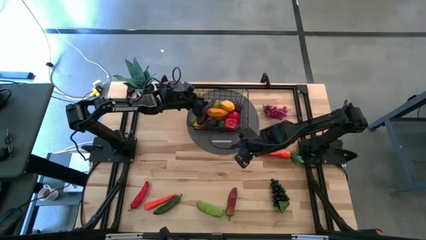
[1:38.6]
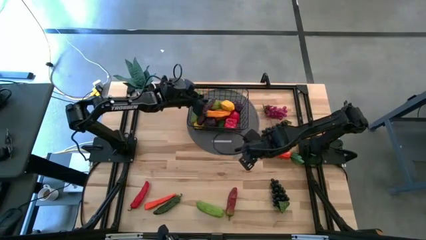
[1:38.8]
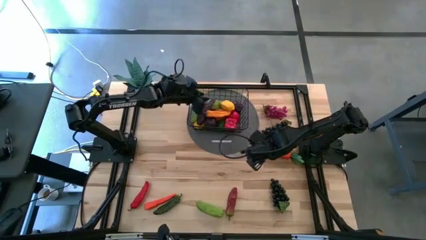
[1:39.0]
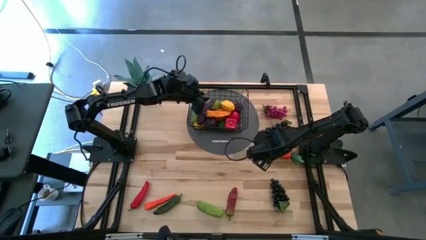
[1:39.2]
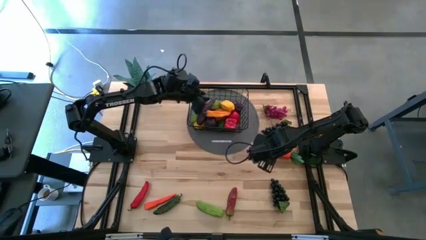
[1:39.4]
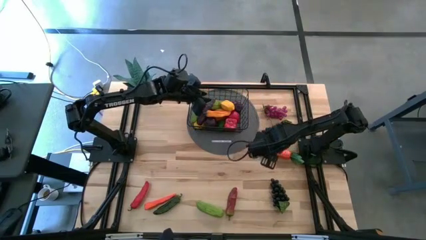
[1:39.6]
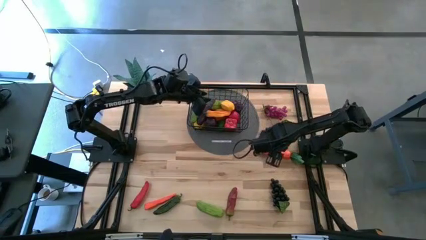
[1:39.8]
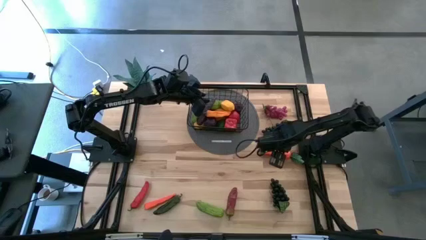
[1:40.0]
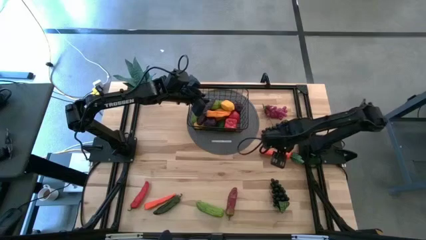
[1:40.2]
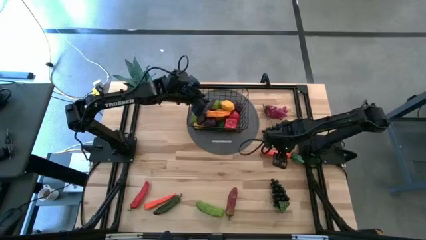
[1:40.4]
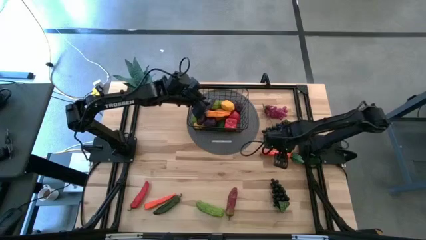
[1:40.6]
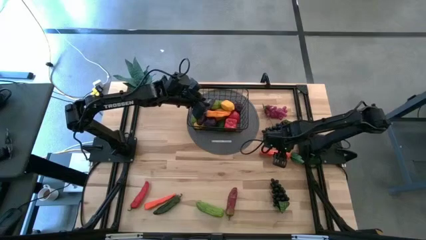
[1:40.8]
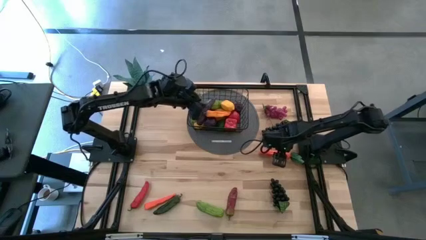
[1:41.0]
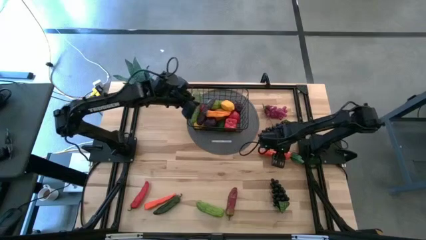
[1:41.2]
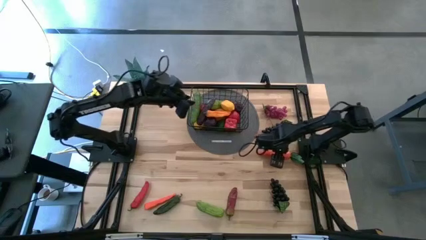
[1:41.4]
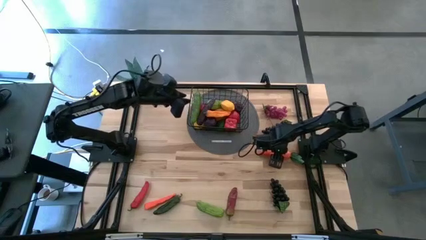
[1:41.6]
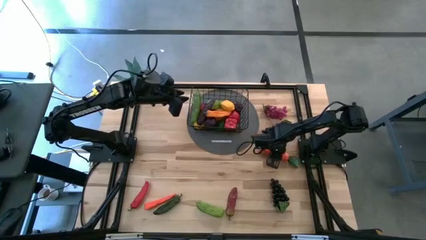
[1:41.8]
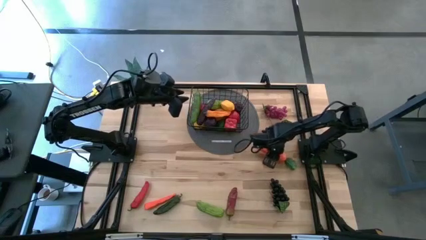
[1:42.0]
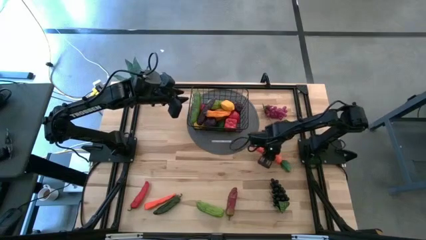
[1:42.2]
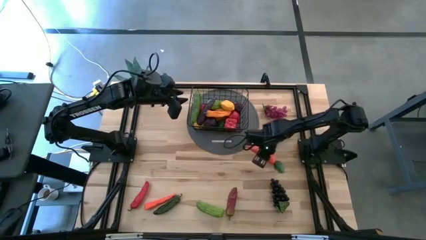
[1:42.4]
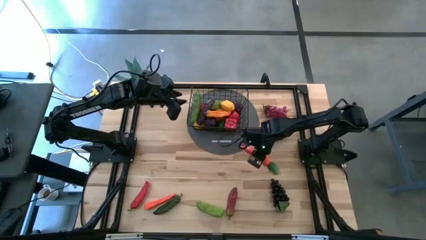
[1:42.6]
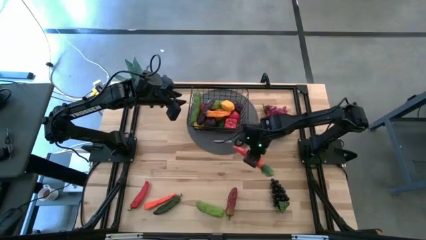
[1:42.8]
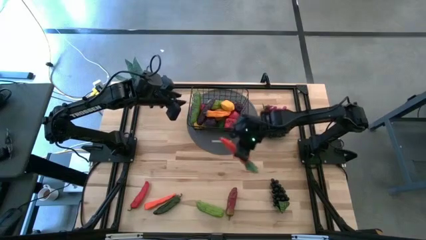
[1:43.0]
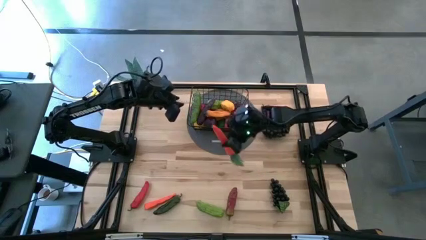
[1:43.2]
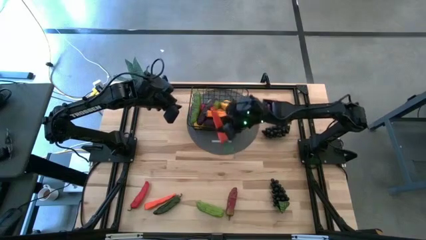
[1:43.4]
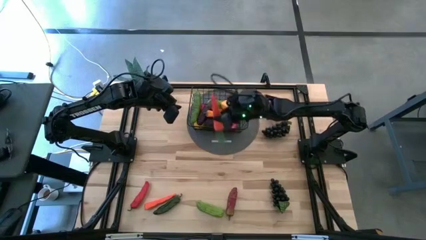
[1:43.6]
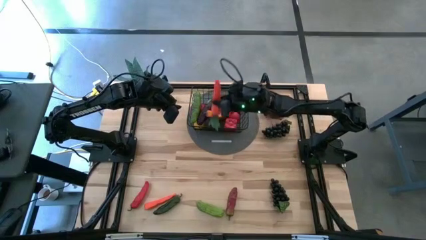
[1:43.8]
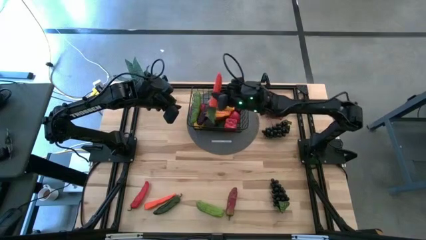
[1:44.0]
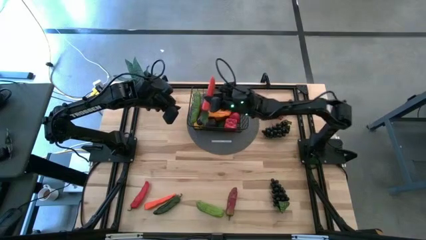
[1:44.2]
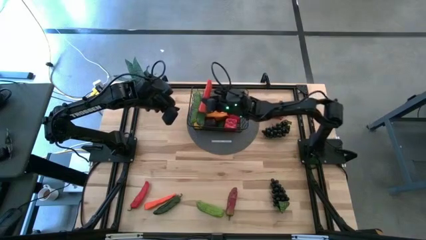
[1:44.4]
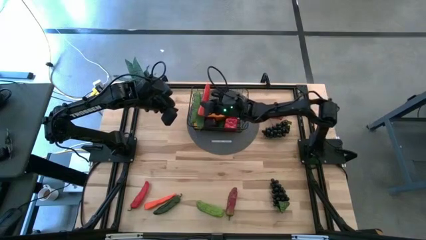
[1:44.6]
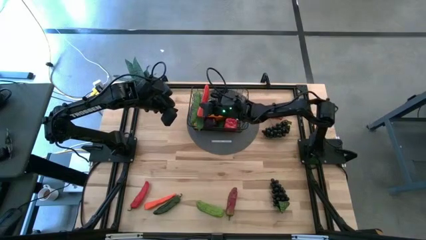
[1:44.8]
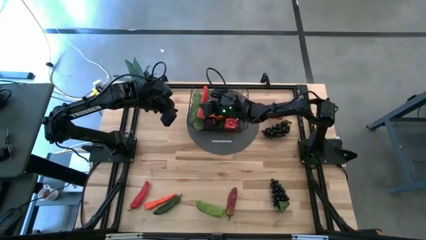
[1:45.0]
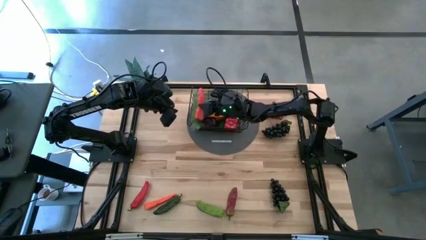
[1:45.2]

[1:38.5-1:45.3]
Task: Build produce basket
Put the top carrot into the wire basket

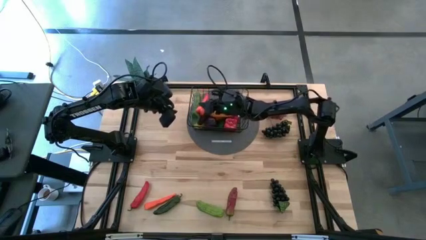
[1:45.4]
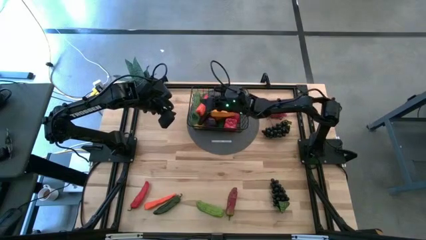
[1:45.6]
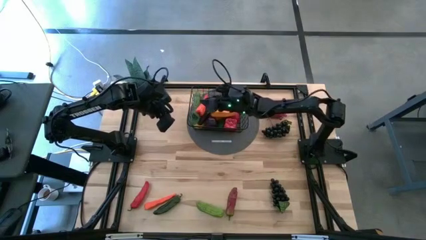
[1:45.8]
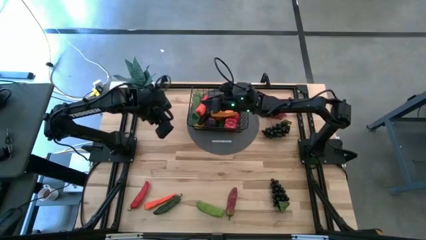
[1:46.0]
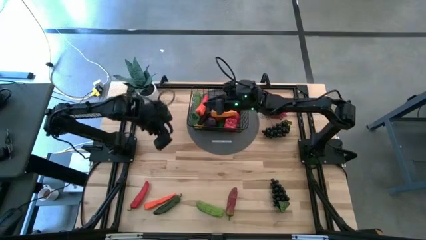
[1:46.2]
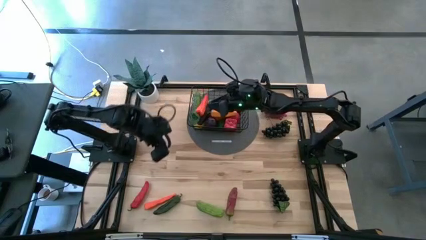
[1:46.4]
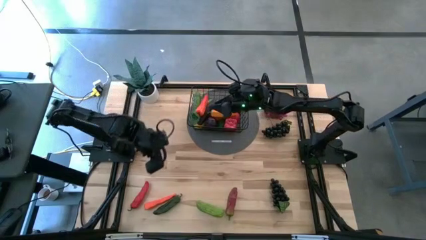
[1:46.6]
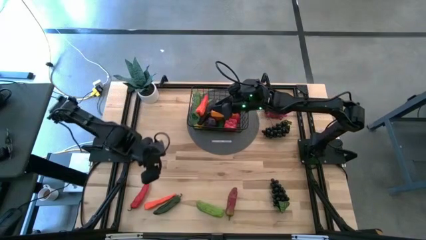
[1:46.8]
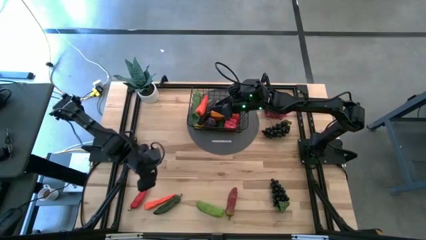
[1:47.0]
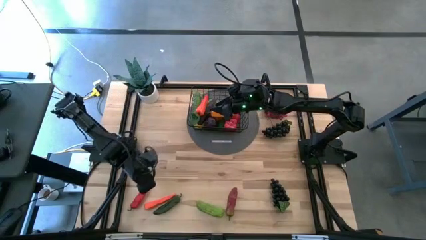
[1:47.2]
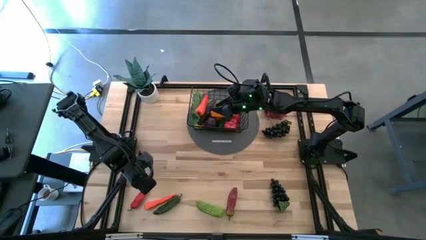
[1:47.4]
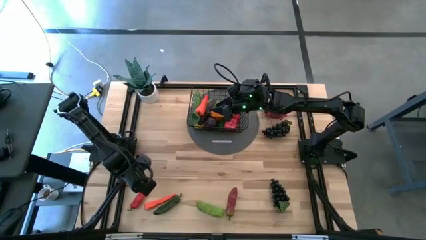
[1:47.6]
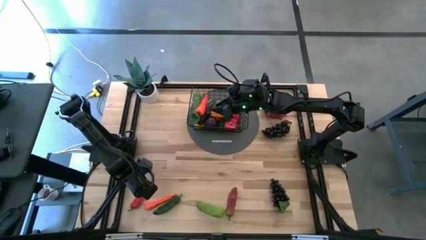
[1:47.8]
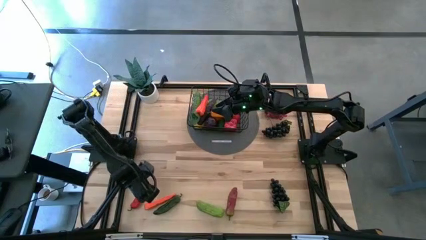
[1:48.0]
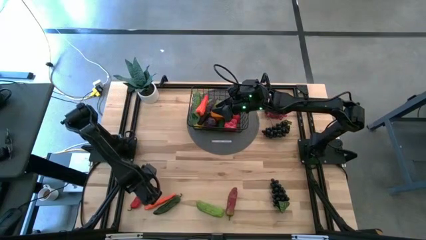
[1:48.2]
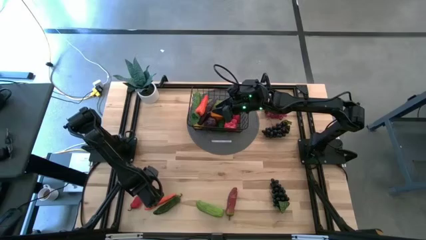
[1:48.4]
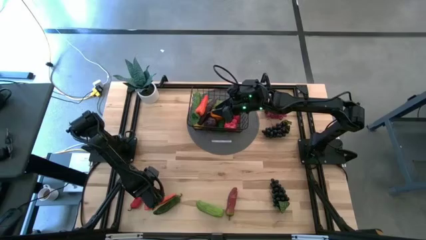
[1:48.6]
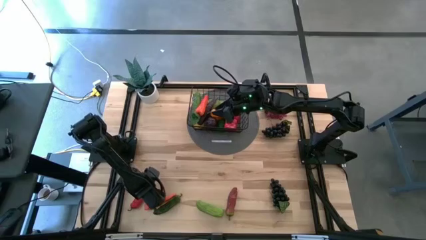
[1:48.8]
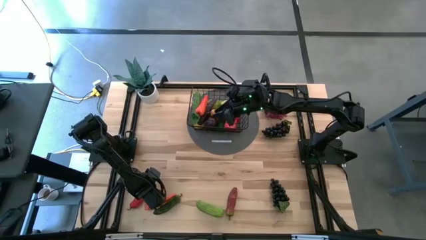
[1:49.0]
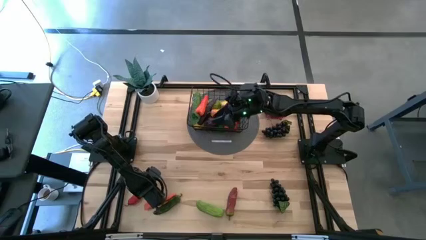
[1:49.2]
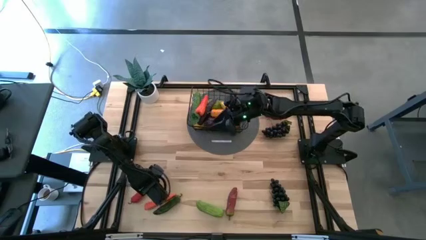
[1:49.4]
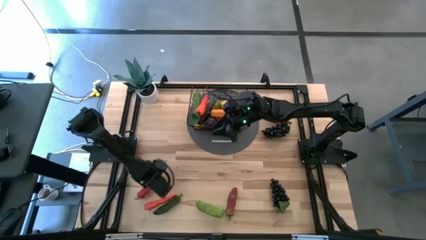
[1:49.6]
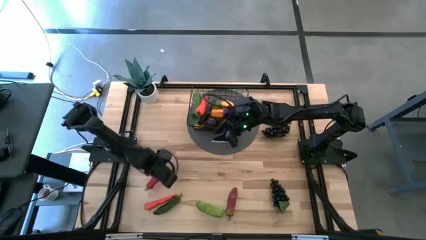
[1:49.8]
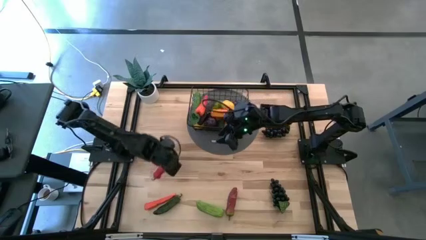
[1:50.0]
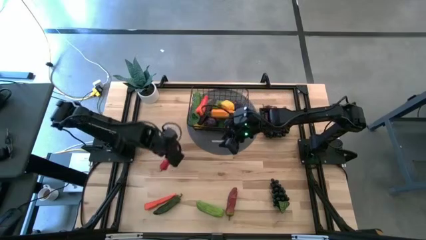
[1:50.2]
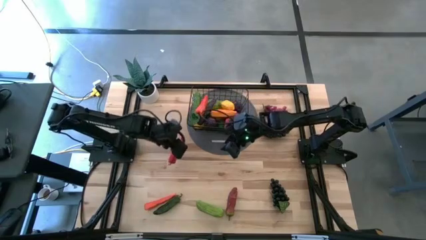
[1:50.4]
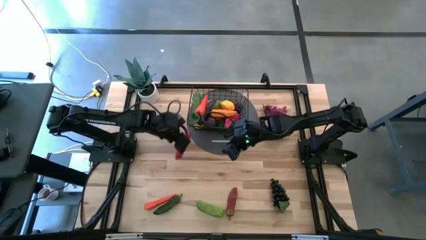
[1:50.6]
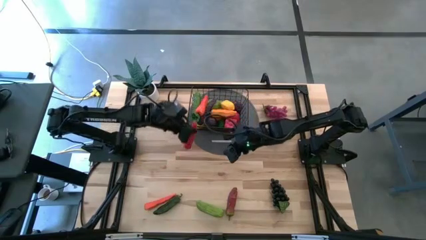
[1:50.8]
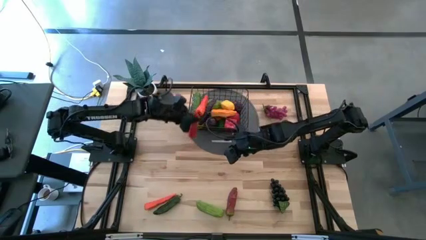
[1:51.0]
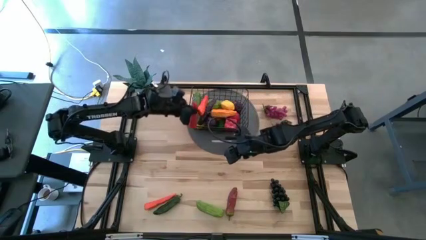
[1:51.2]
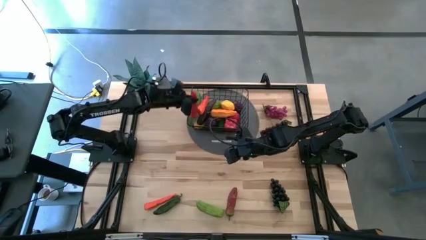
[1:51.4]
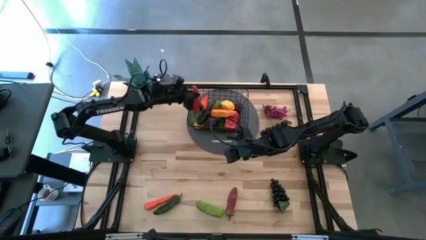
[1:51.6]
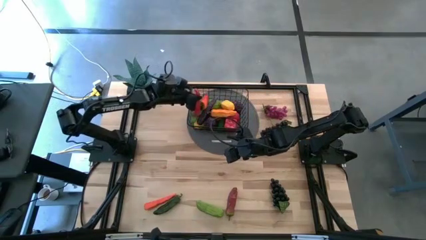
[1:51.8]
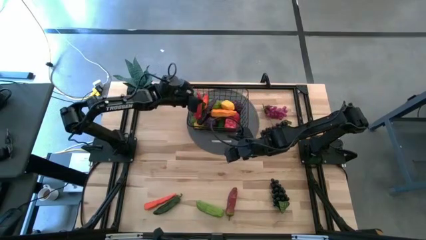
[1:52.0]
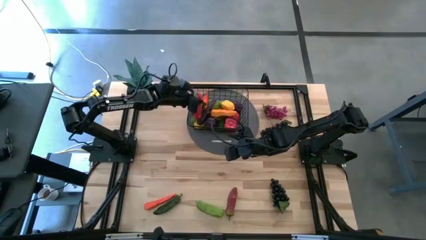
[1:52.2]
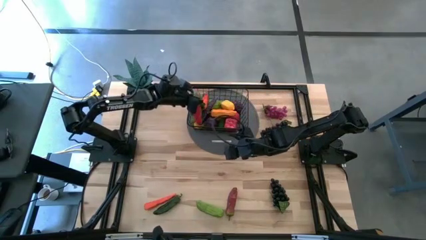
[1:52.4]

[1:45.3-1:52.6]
Put the red chili pepper into the wire basket

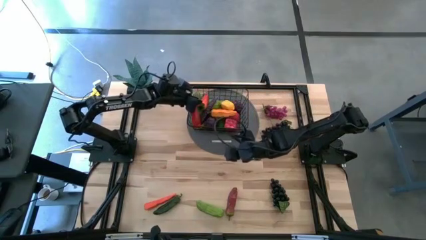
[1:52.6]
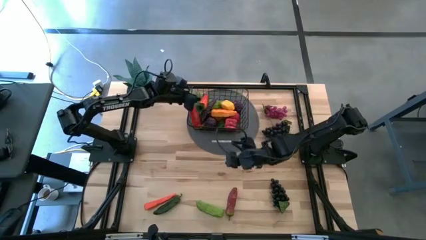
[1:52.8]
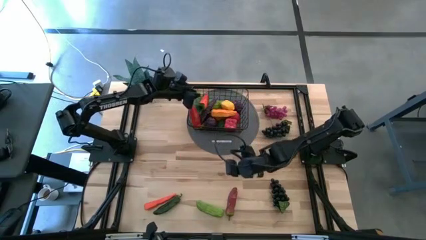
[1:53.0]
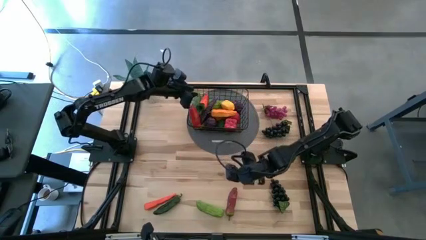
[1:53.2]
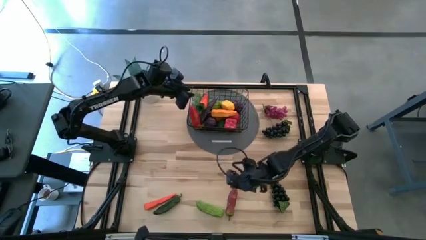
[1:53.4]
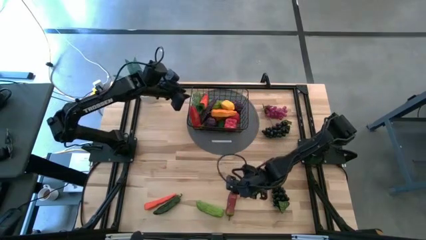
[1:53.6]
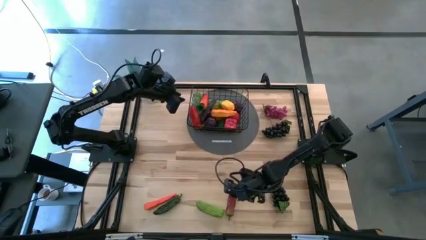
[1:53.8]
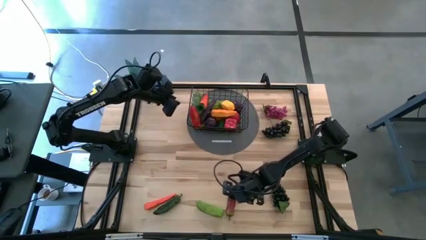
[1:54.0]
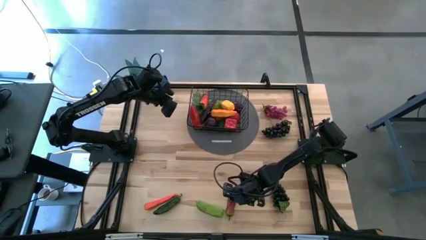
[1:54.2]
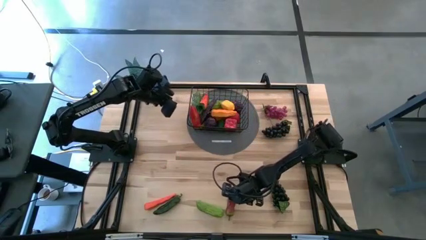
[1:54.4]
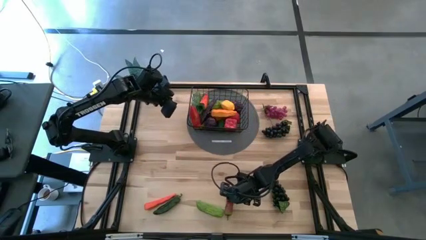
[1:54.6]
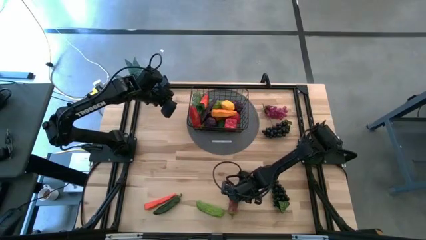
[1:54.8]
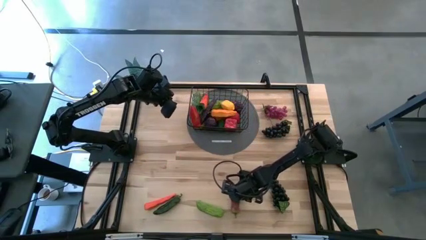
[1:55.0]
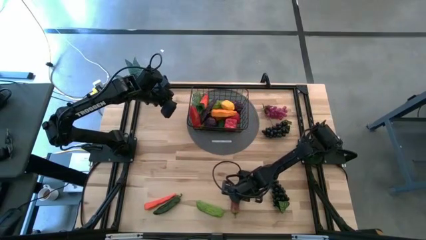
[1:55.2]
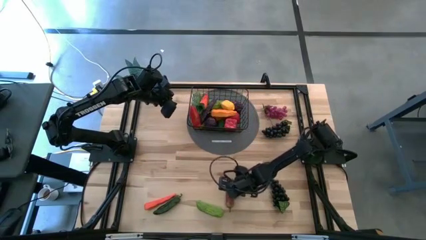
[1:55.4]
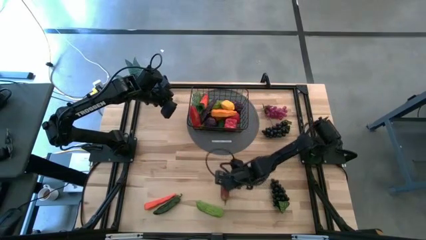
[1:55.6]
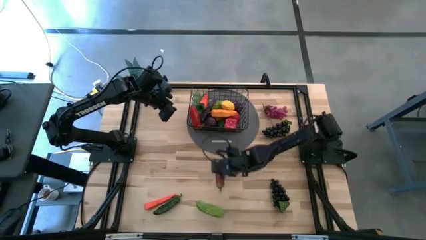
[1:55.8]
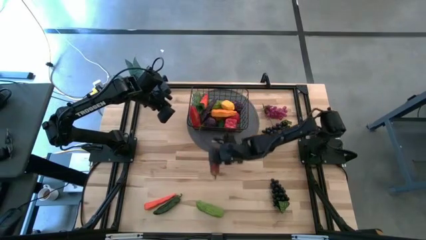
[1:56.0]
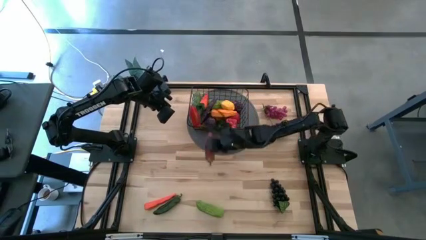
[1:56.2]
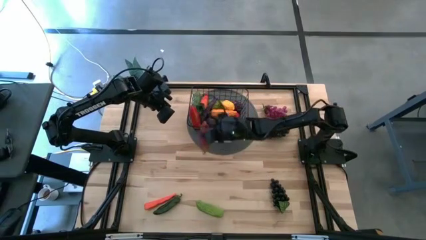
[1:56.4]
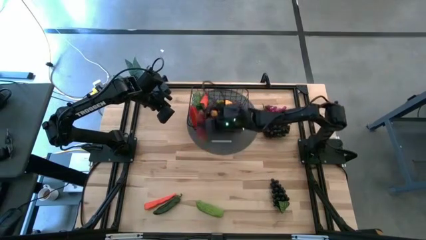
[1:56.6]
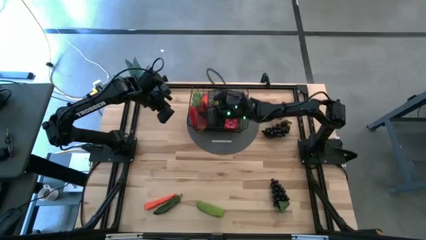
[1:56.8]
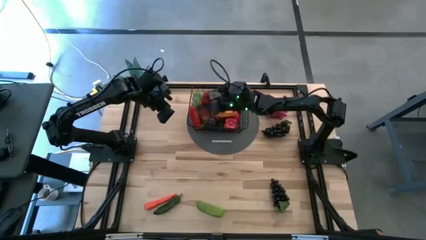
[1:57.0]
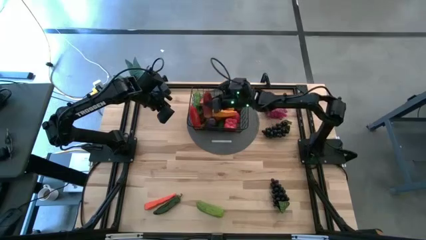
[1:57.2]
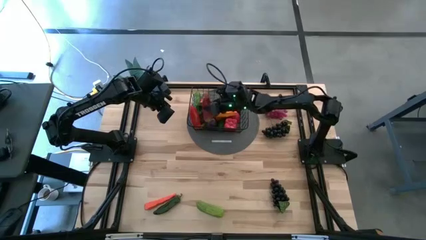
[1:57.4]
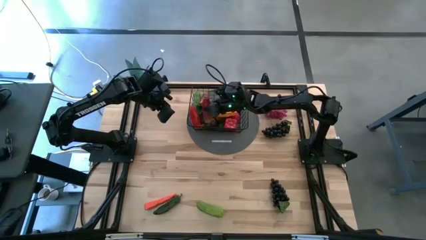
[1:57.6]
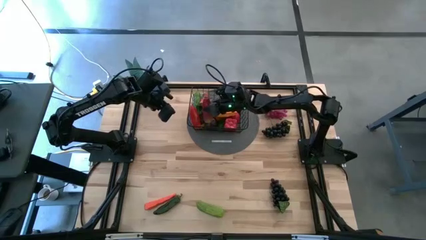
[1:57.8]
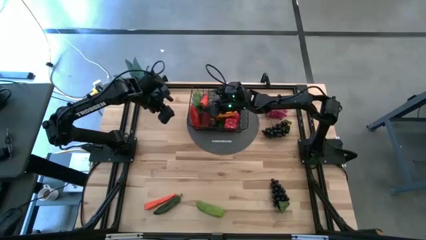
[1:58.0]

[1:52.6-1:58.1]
Put the dark red chili pepper into the wire basket
